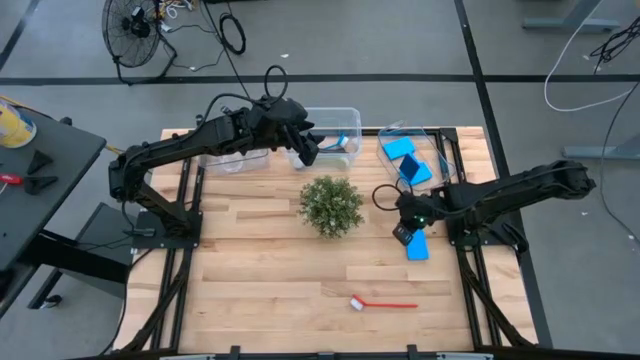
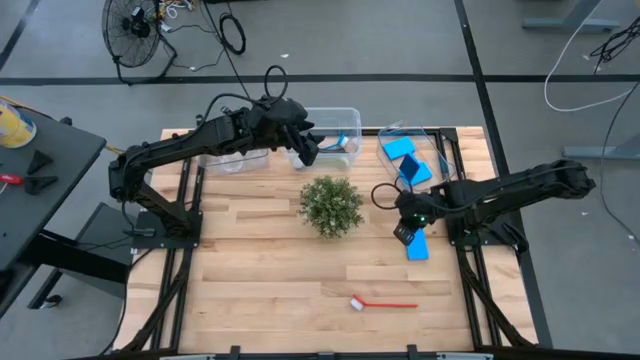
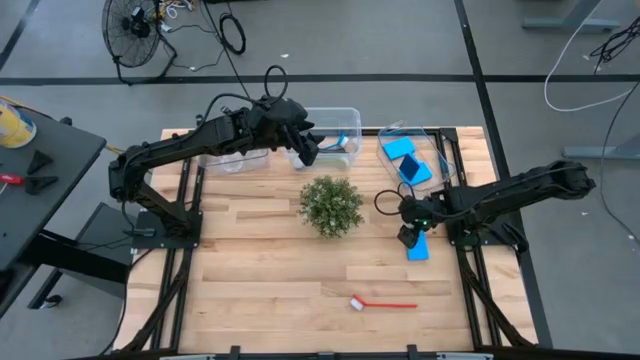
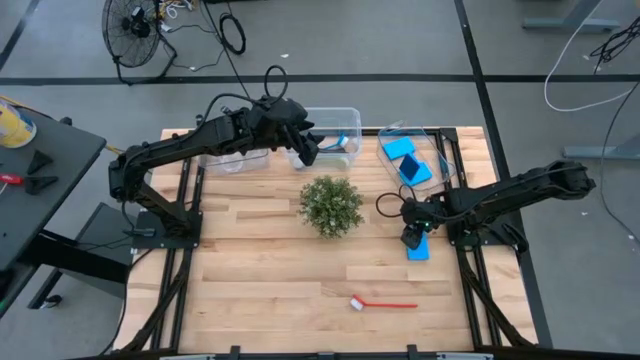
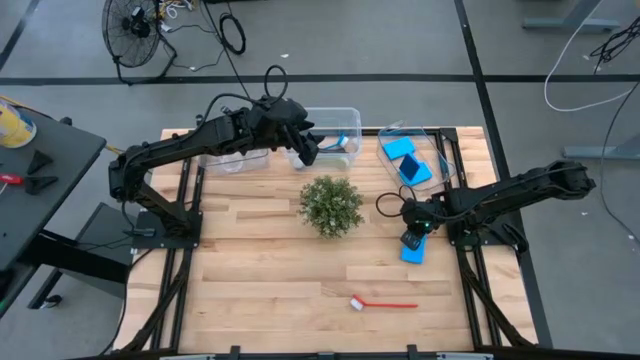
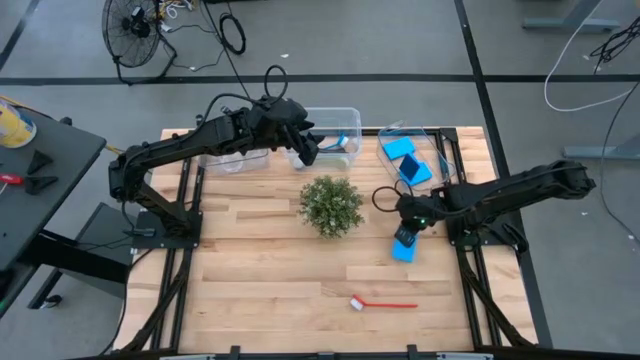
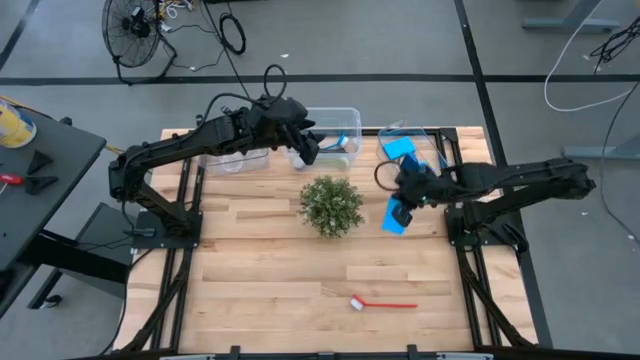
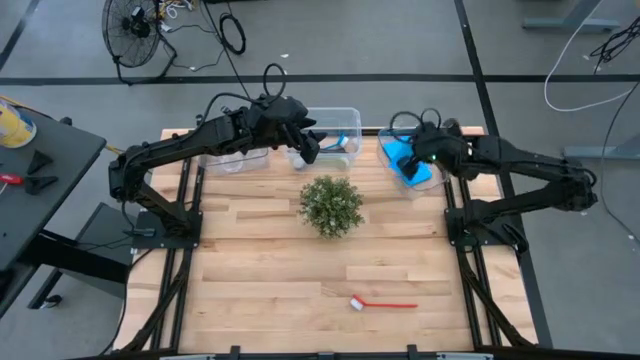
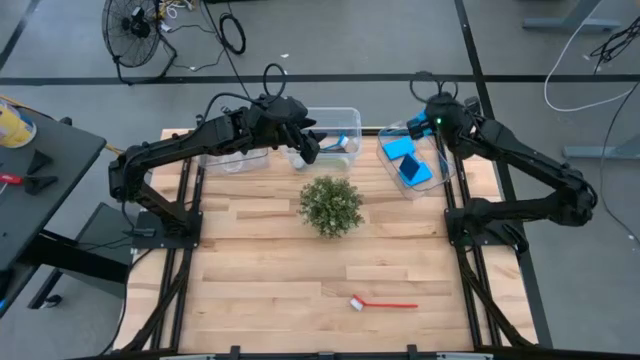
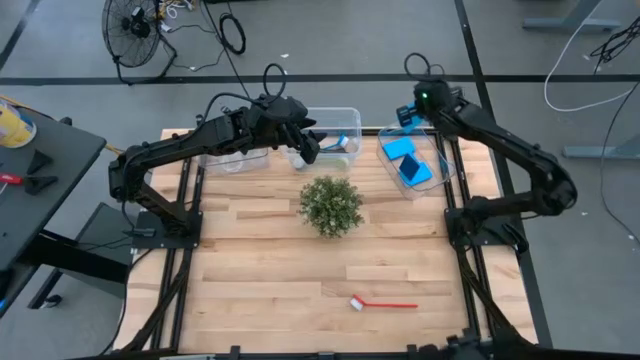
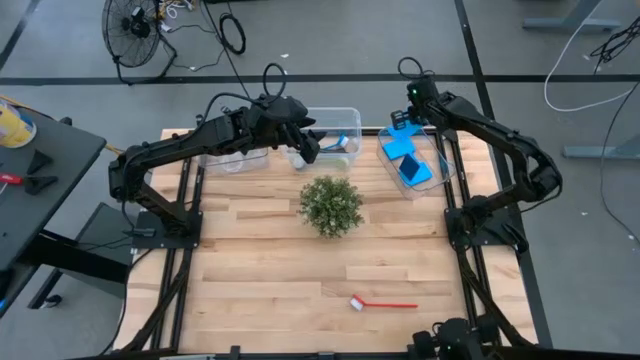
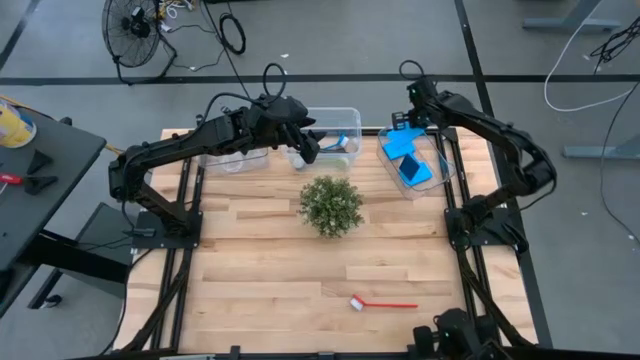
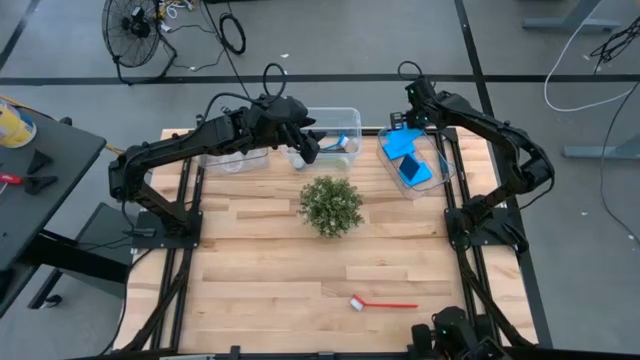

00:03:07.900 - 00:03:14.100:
Task: Pick & Place Kitchen Sink Supplies
Put the blue sponge into the right transparent bin

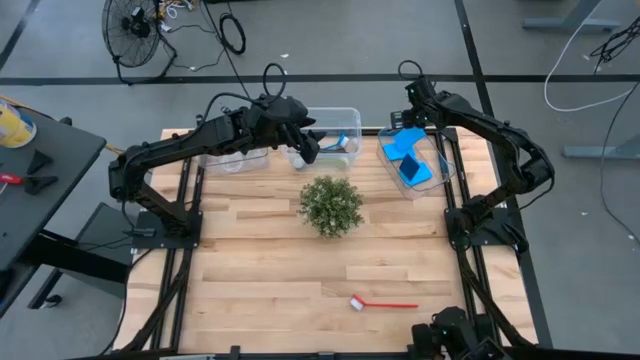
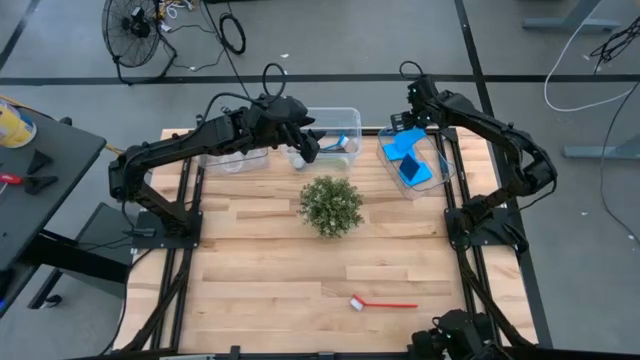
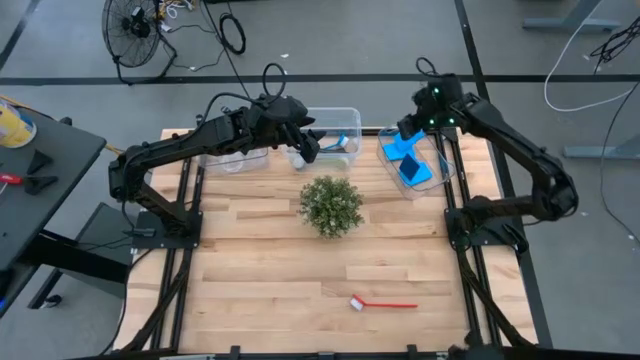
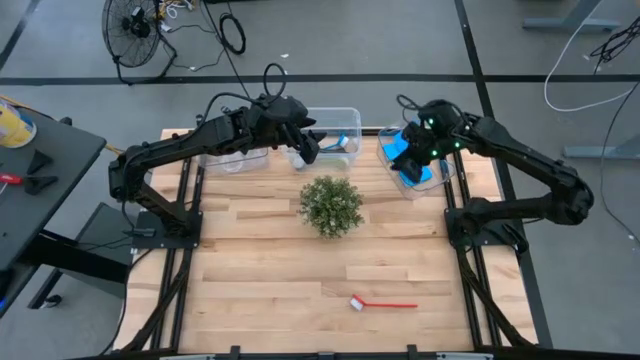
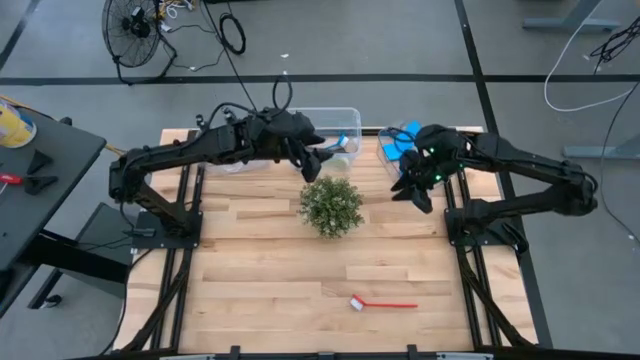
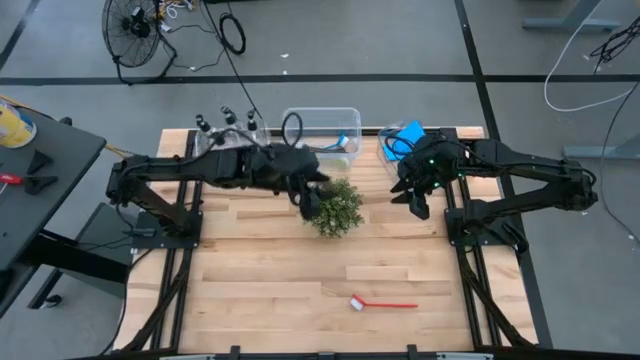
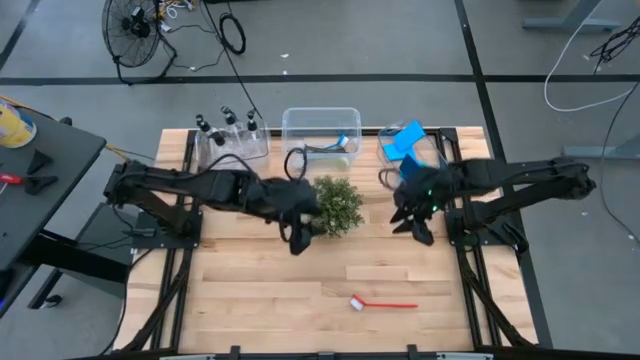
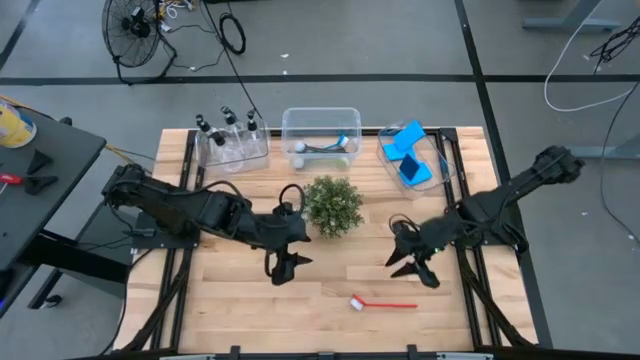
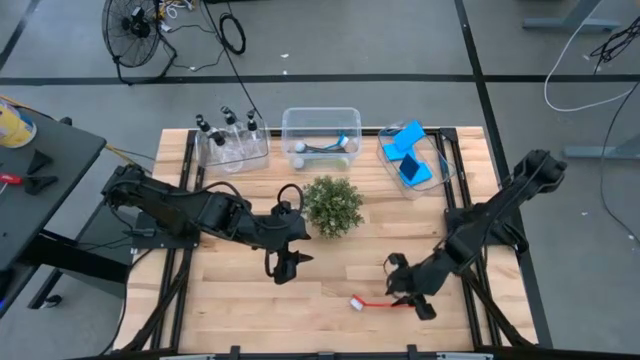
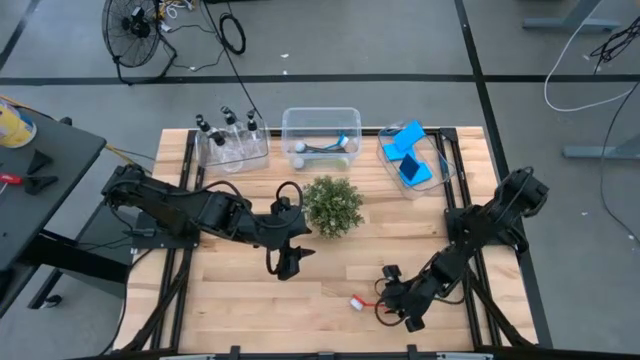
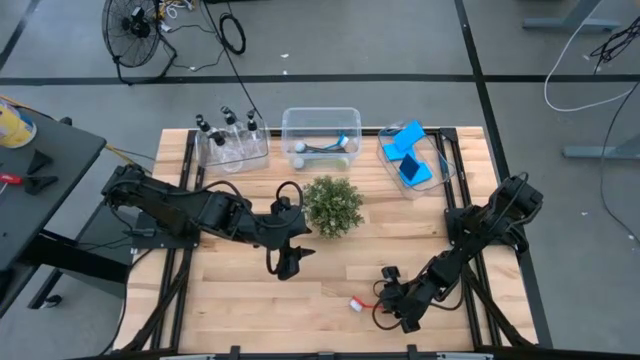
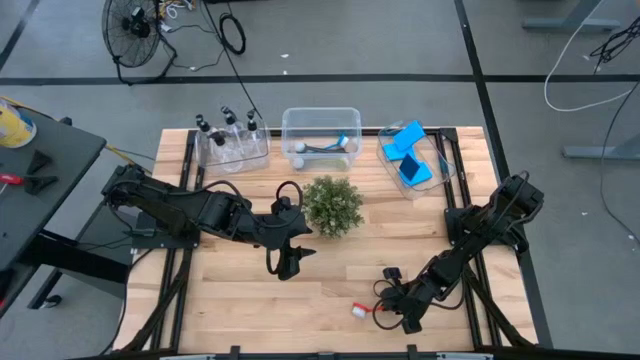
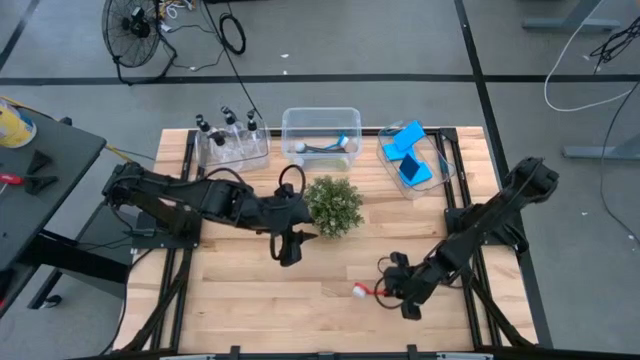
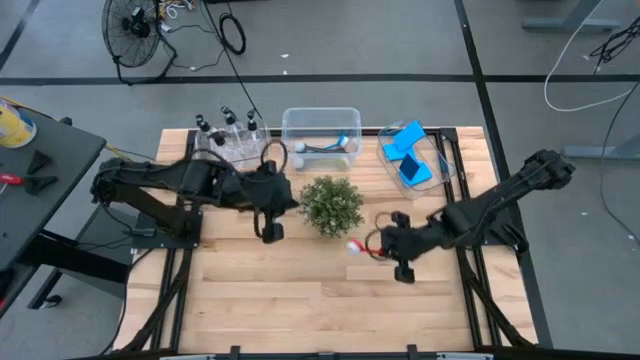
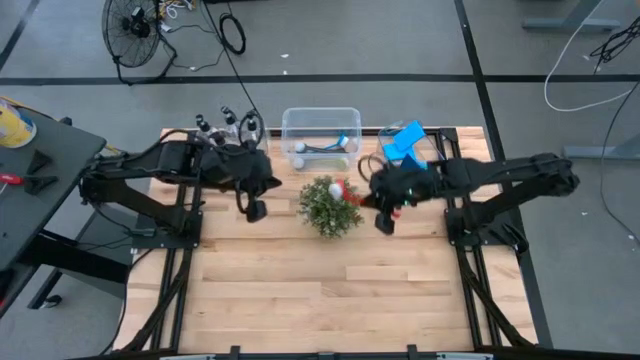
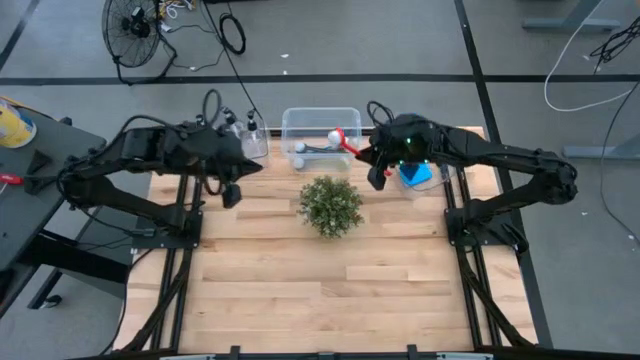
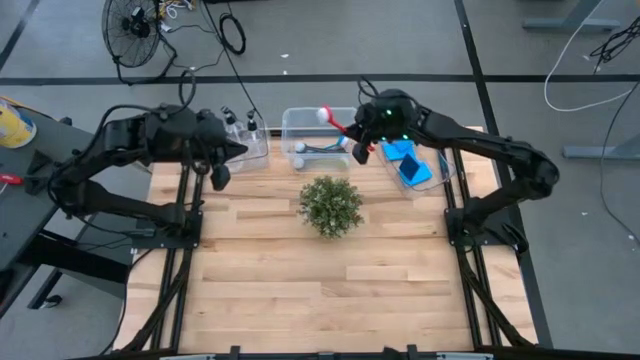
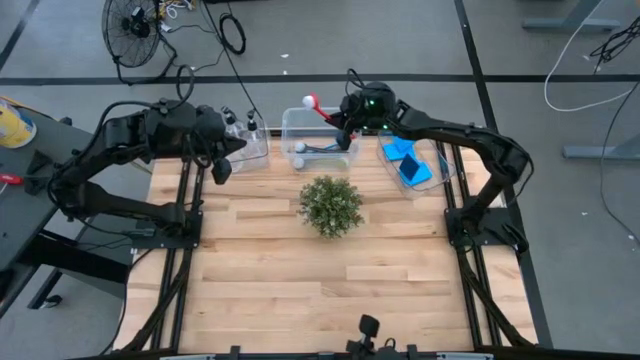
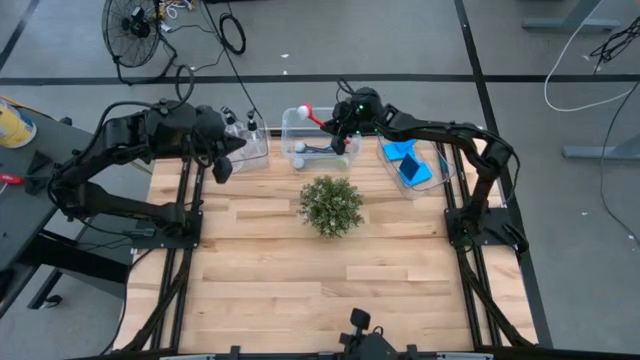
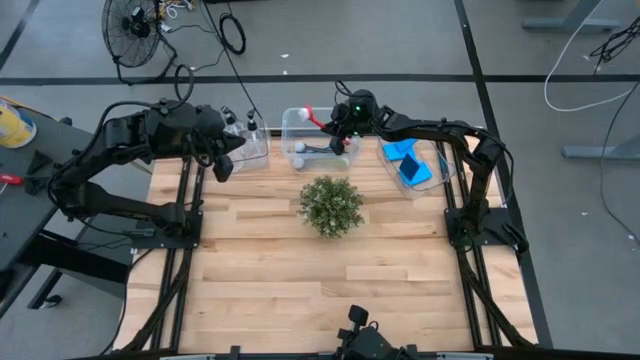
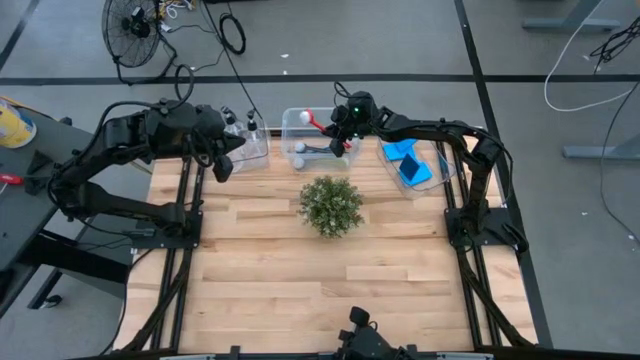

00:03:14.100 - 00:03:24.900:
Put the orange dish brush into the white bin
